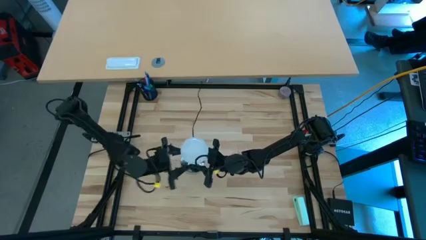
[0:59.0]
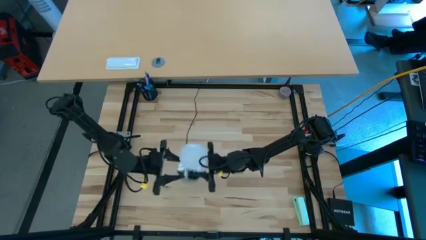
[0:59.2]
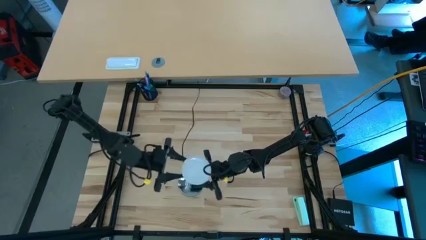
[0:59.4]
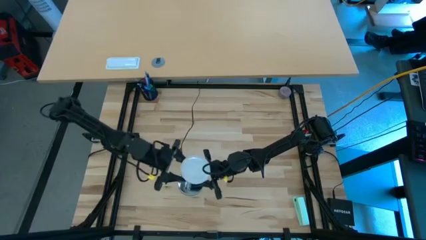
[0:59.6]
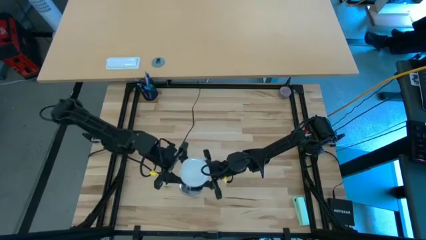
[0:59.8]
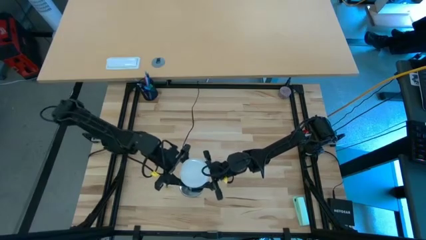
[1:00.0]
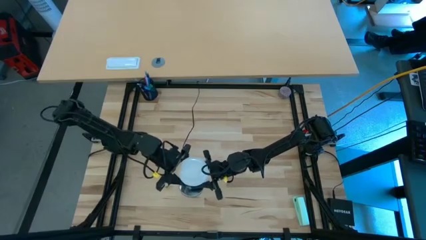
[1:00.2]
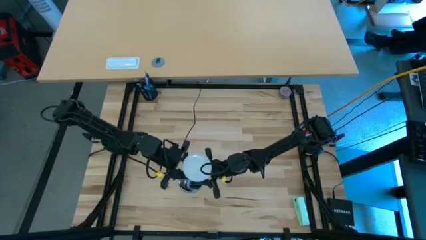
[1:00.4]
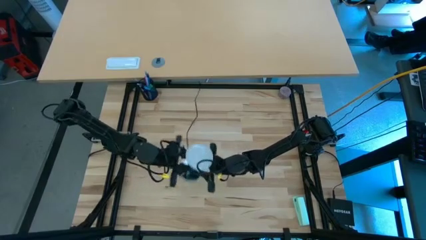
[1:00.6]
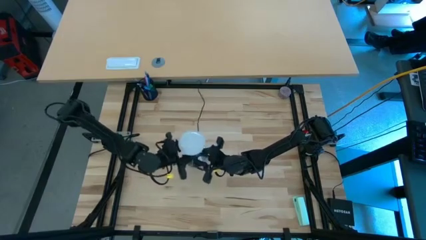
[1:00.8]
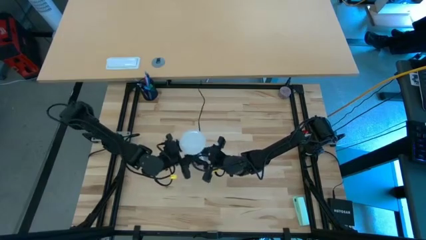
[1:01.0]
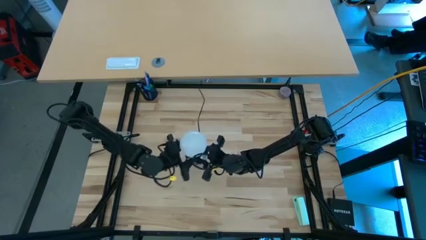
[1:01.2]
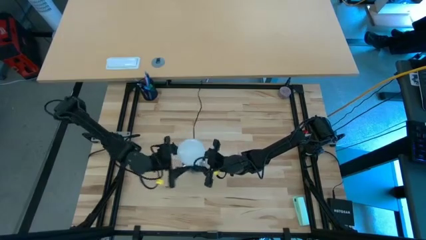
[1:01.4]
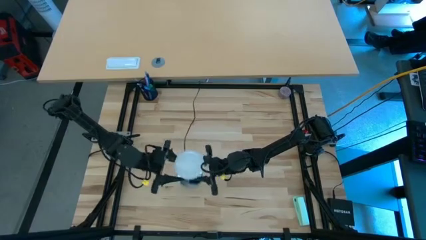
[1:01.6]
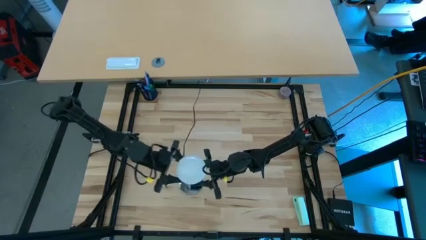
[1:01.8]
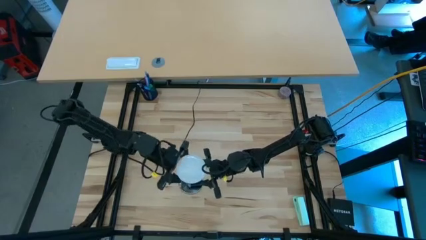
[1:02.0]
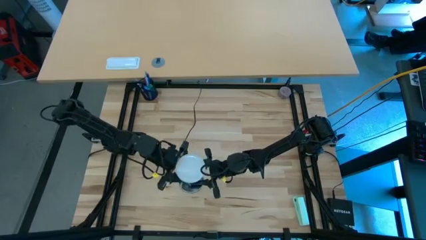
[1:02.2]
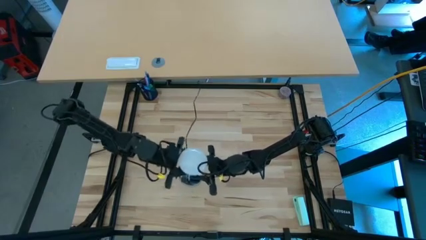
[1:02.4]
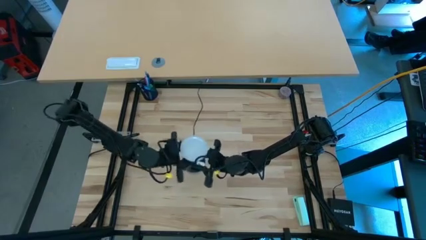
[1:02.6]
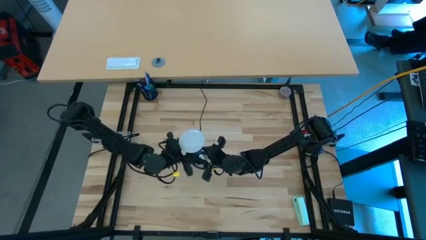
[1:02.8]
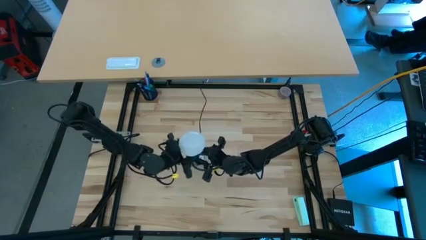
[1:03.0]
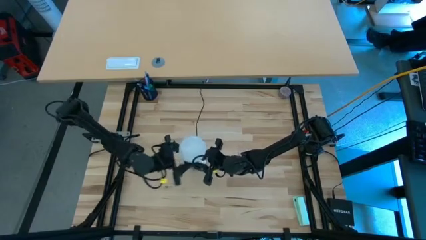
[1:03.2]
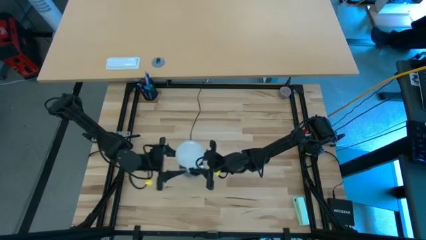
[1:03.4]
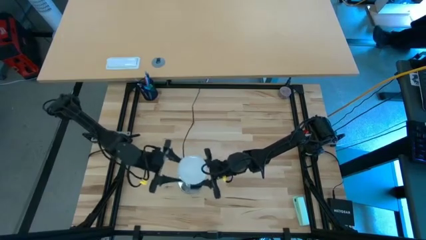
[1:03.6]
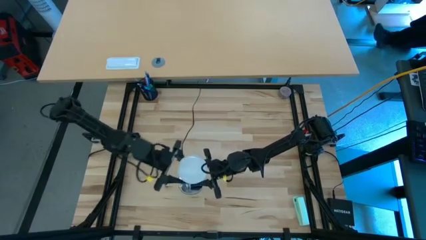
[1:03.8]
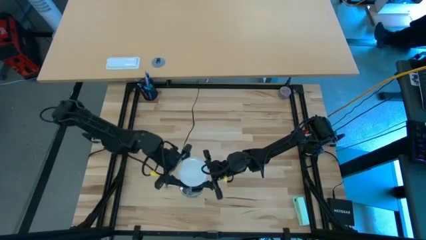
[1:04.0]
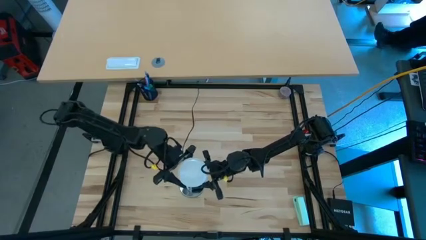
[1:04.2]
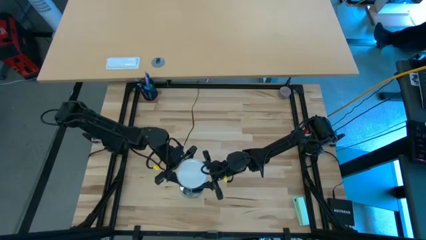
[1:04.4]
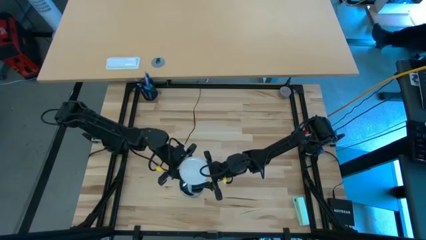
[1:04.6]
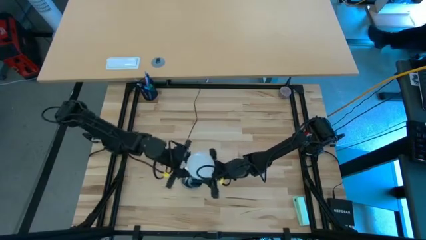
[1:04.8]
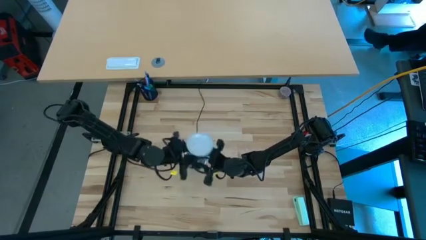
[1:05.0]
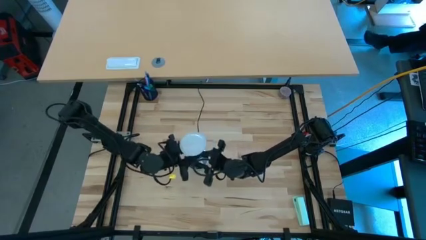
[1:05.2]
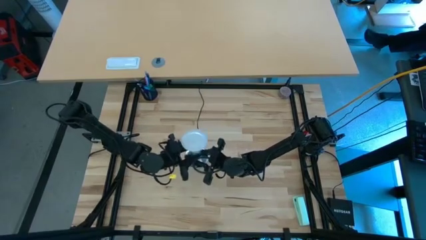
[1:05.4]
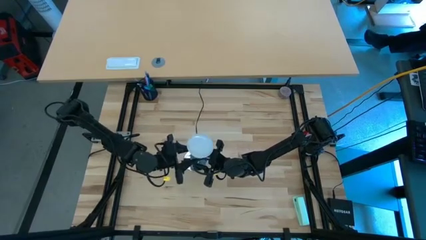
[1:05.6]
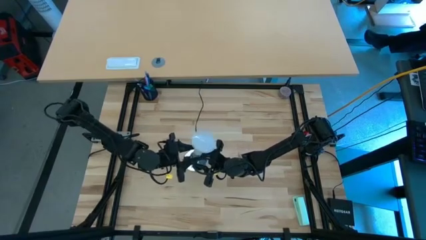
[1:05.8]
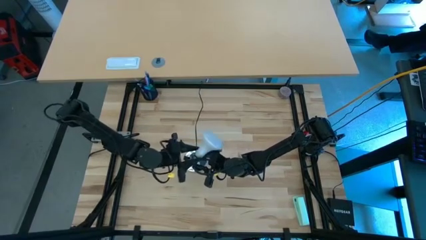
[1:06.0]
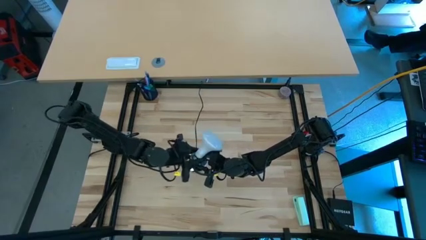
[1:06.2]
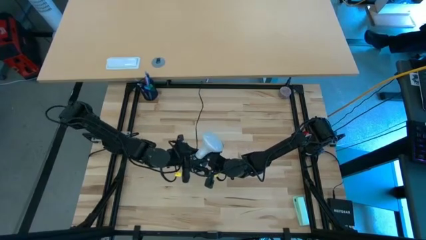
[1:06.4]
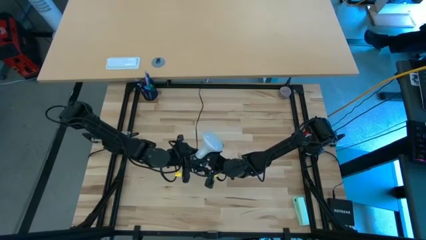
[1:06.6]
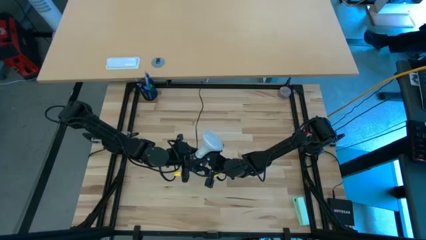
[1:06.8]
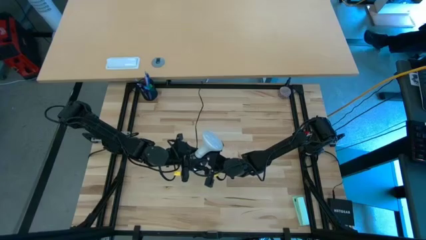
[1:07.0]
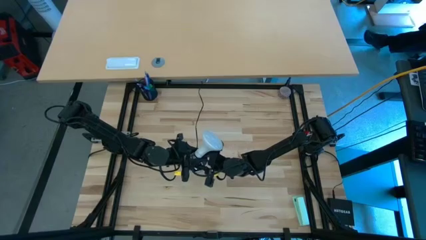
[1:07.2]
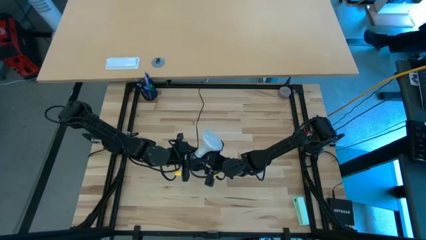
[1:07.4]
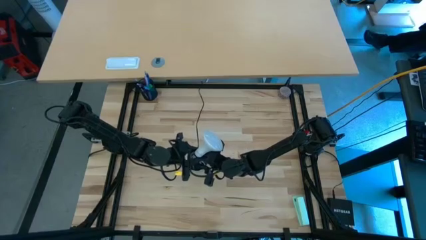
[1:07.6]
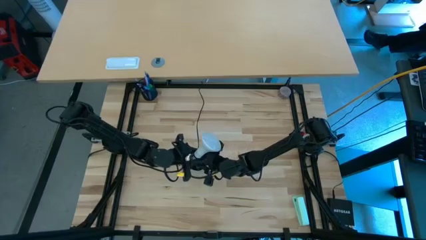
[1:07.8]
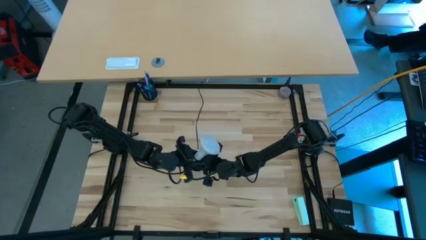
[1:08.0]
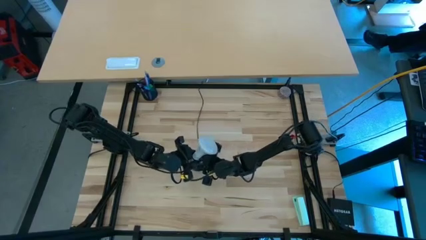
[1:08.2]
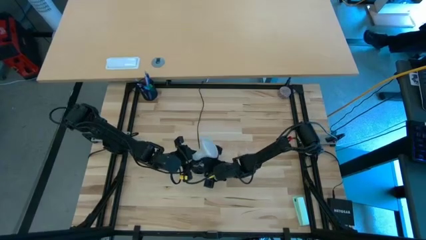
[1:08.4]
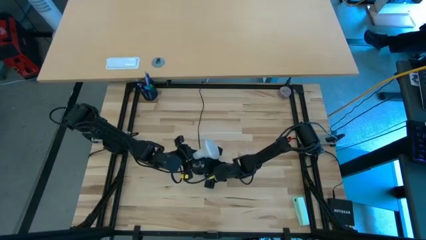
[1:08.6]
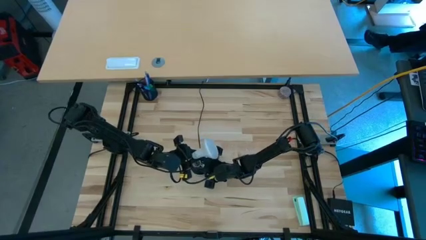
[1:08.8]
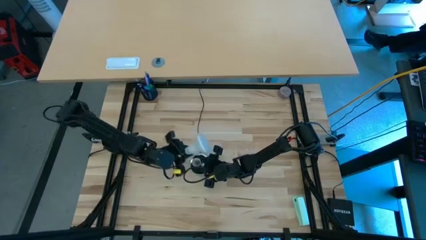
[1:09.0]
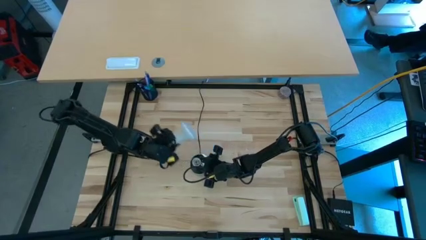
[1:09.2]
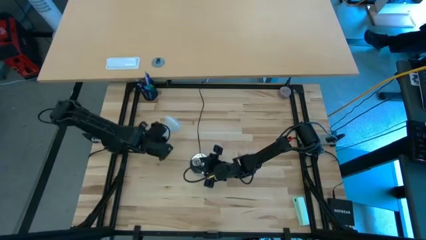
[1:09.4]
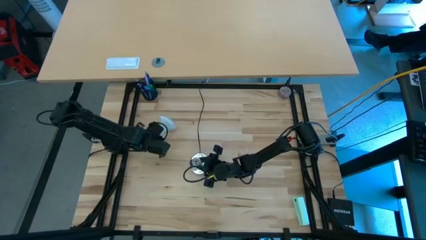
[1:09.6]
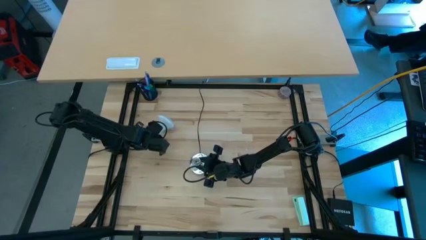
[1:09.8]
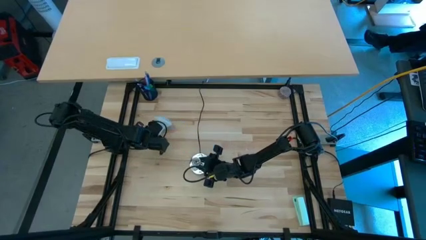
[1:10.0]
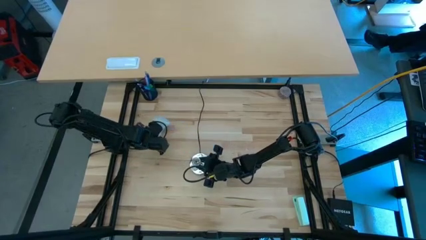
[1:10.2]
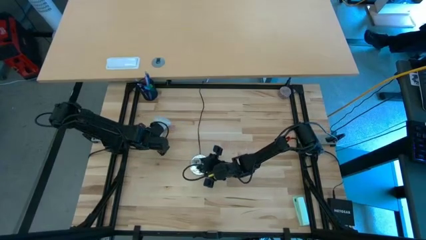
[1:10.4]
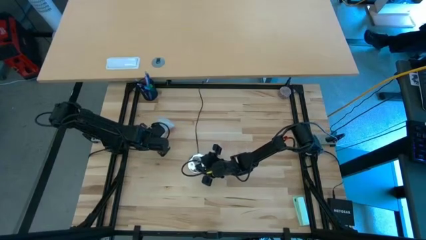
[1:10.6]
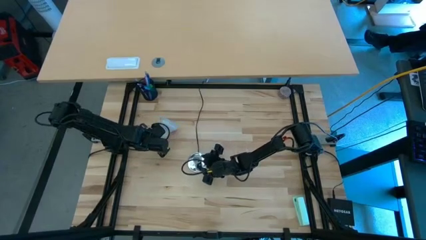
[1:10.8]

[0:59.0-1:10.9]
Task: Screw lightbulb
Remove the lightbulb from the lamp
